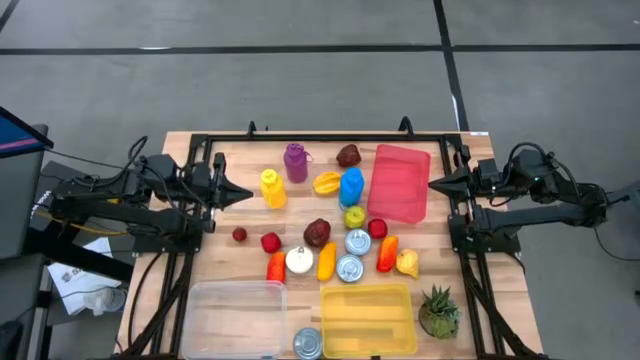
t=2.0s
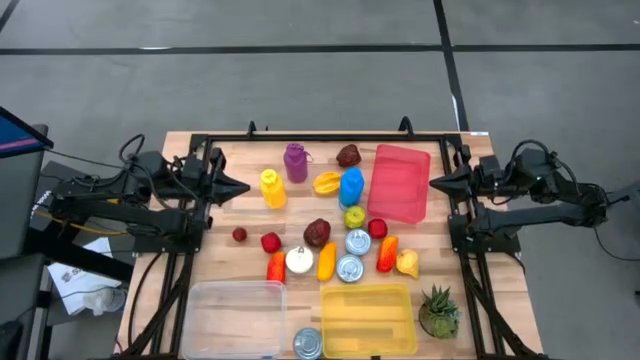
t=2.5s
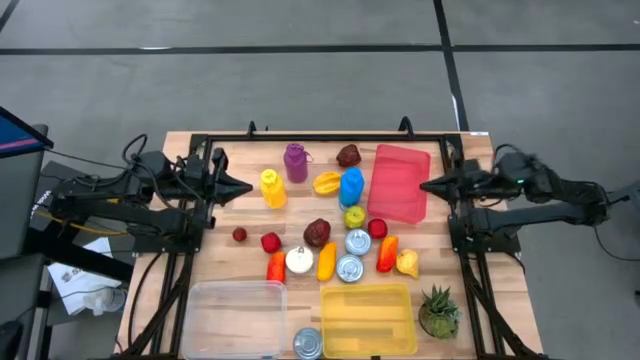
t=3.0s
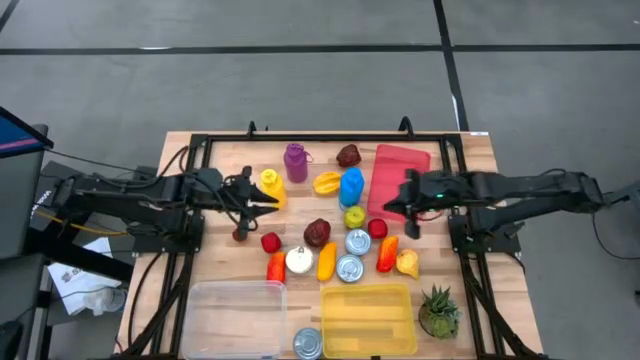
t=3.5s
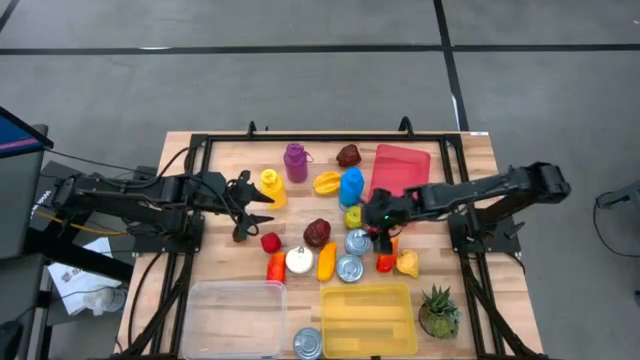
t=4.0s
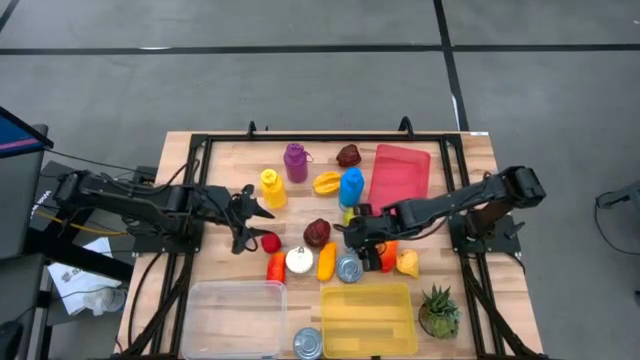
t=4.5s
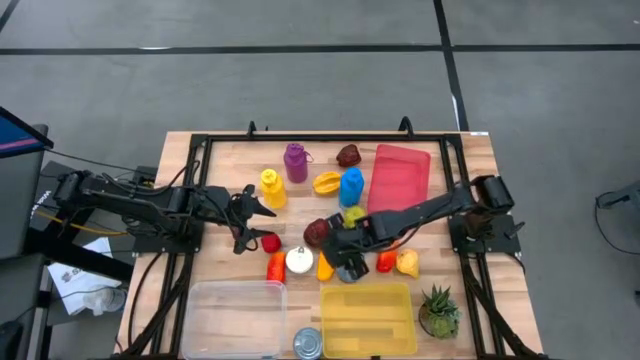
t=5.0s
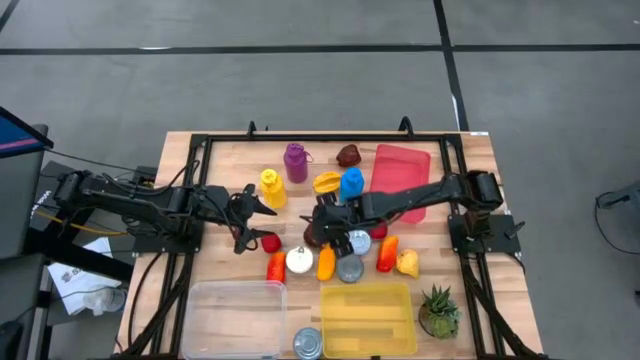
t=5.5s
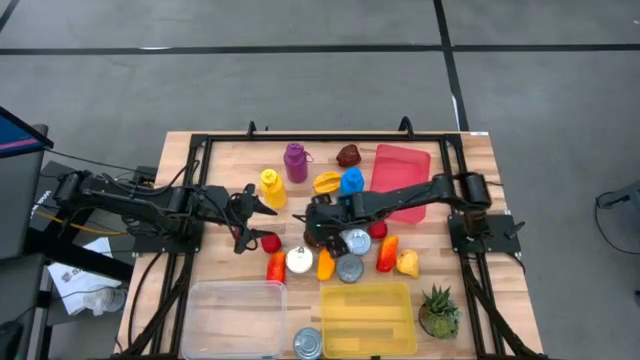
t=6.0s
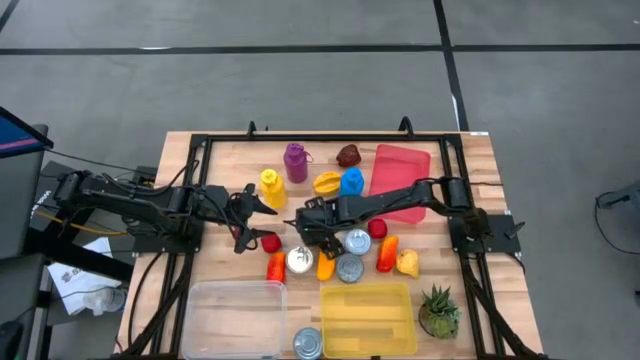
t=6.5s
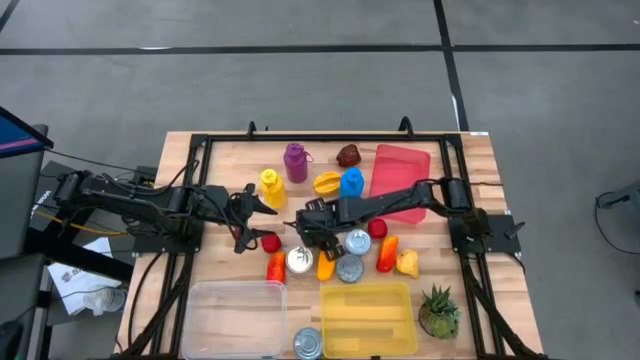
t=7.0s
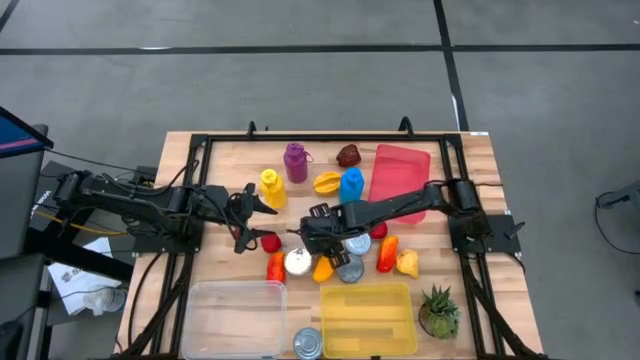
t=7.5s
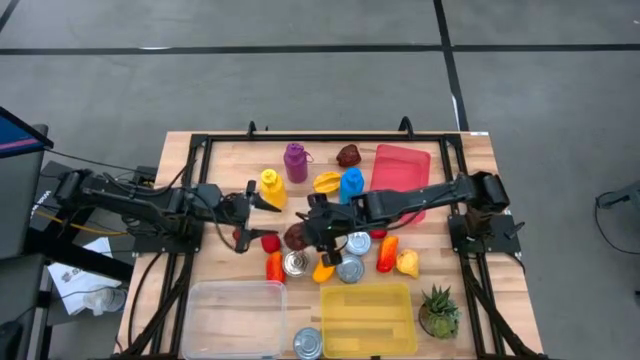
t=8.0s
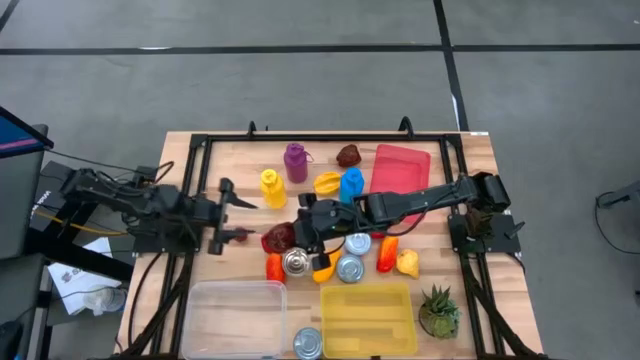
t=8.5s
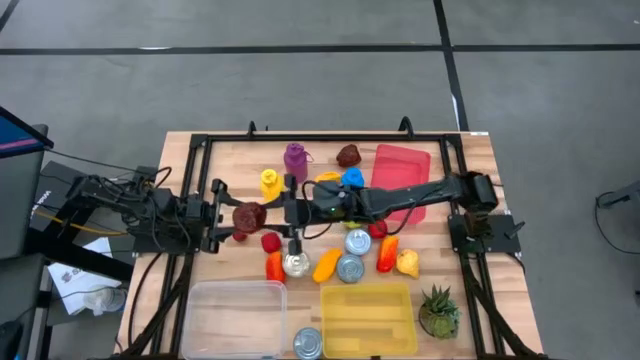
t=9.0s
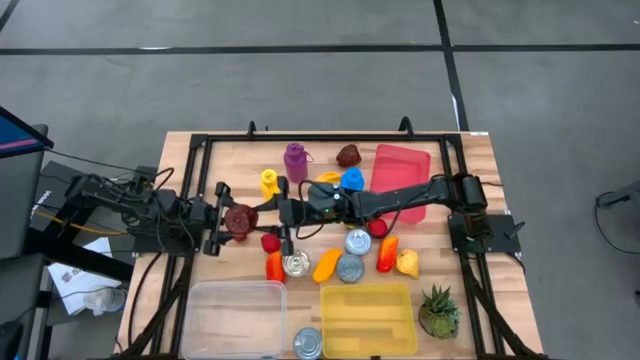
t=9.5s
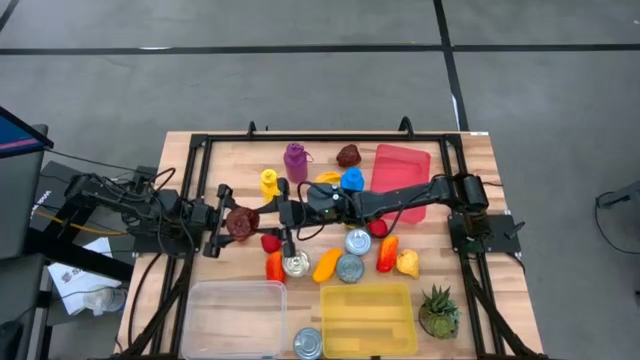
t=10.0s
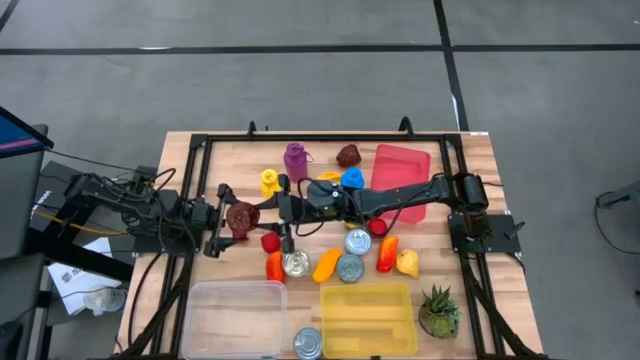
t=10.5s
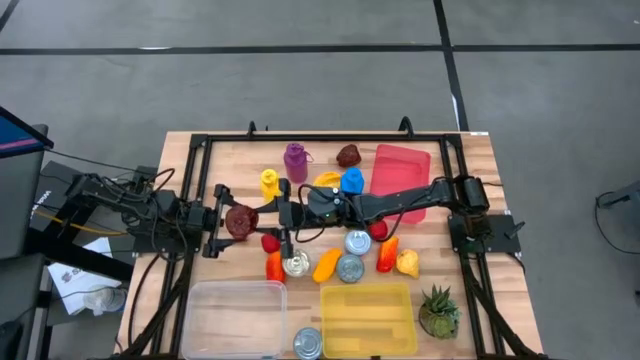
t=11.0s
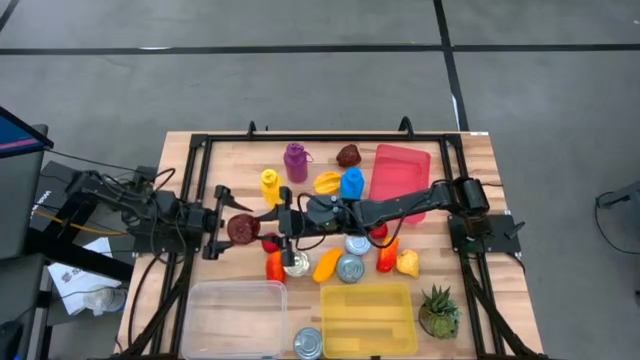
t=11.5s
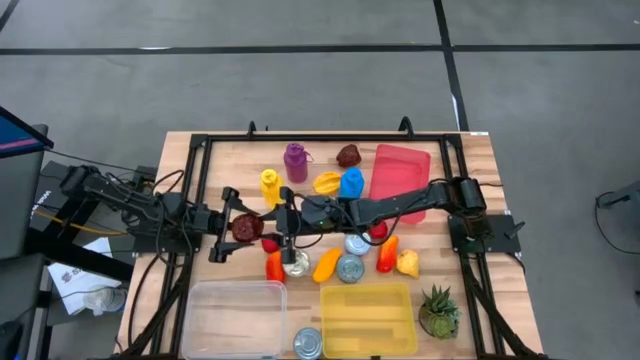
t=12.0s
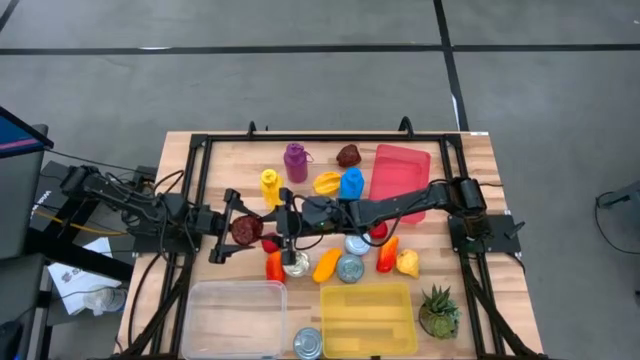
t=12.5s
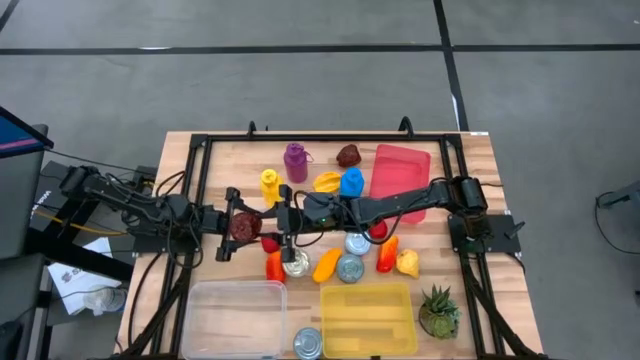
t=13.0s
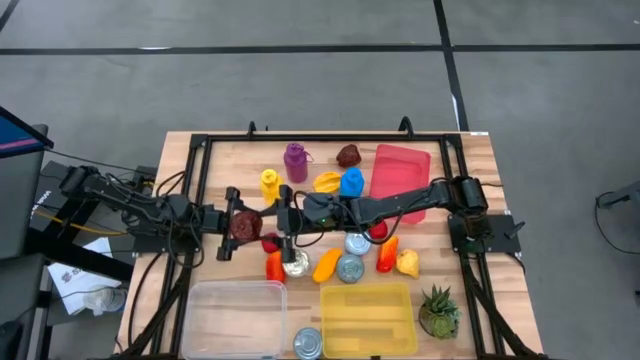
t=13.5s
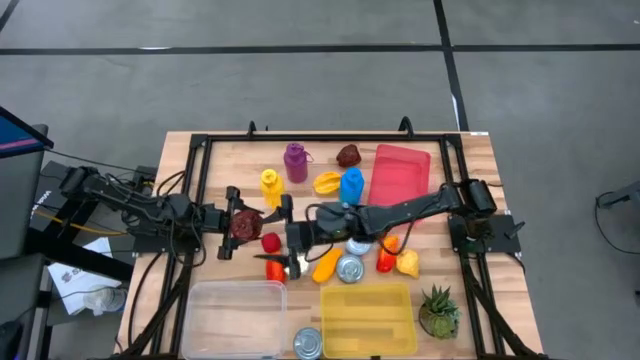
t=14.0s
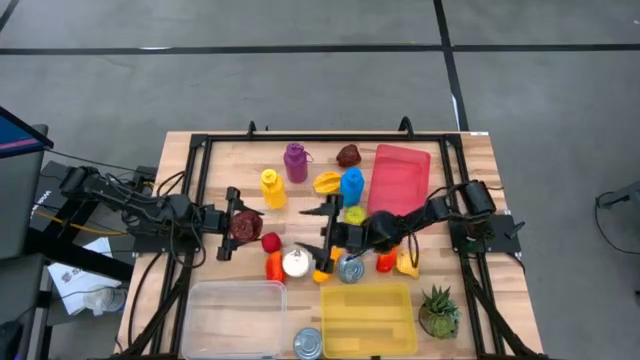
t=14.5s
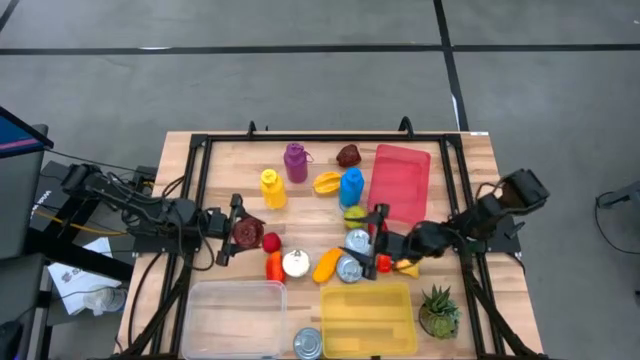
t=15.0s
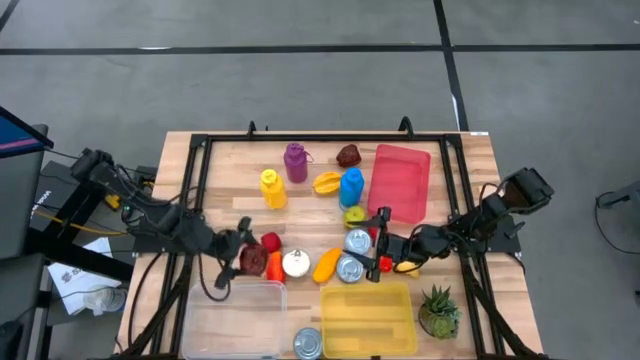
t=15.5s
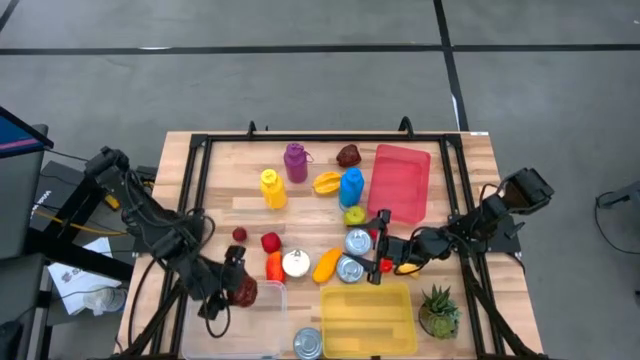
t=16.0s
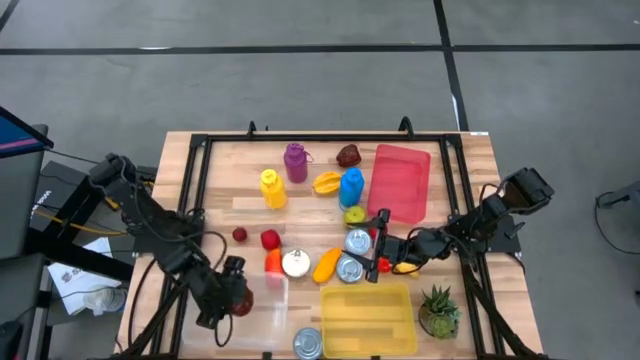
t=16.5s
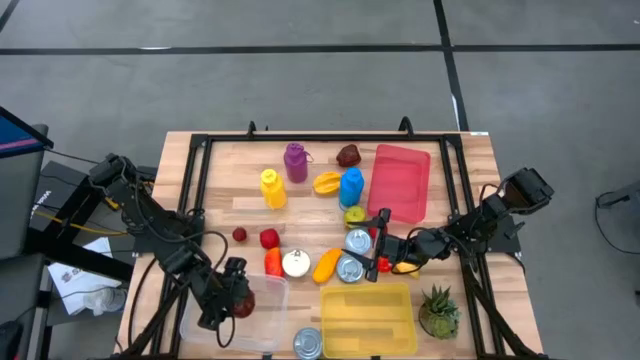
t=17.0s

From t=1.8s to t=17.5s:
Task: Pick & Place Food Item
Put the bottom red apple into the transparent bin
